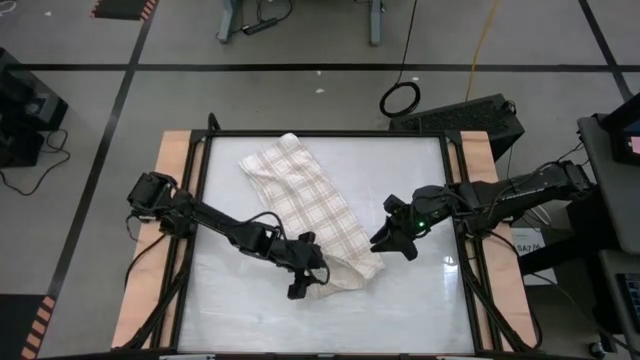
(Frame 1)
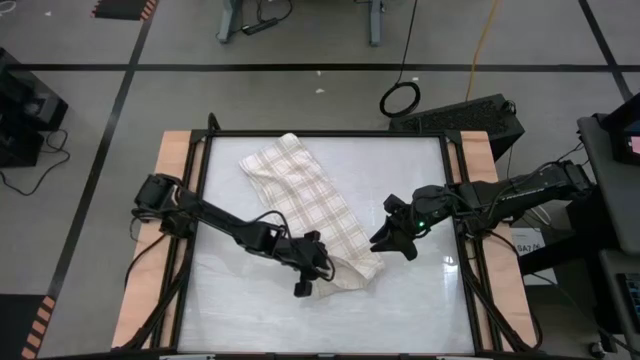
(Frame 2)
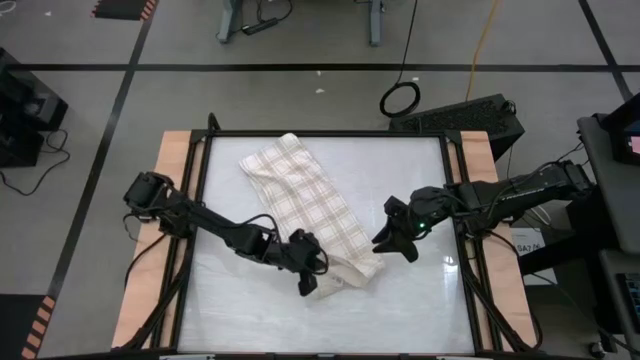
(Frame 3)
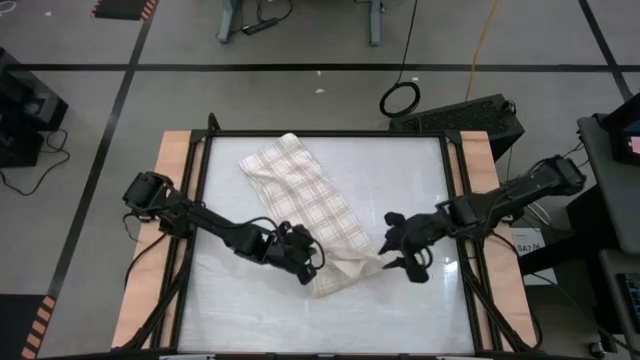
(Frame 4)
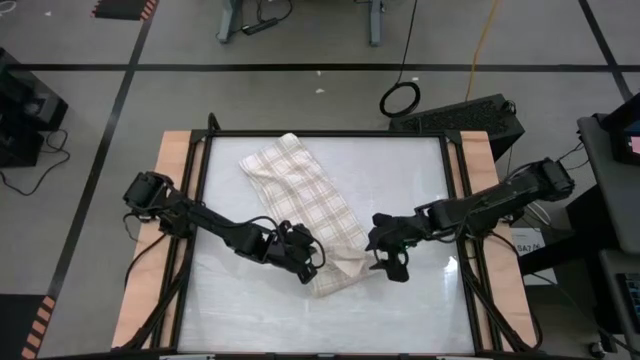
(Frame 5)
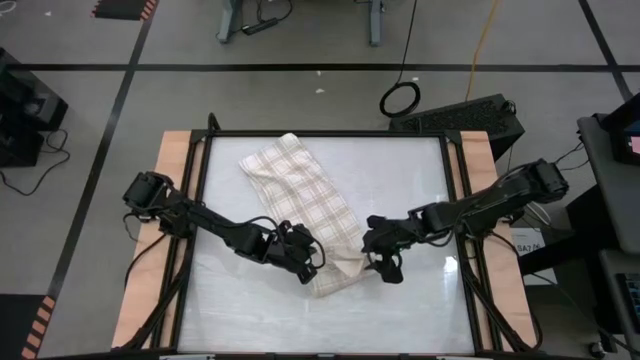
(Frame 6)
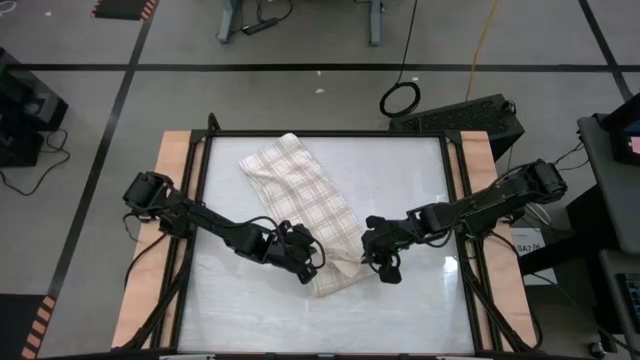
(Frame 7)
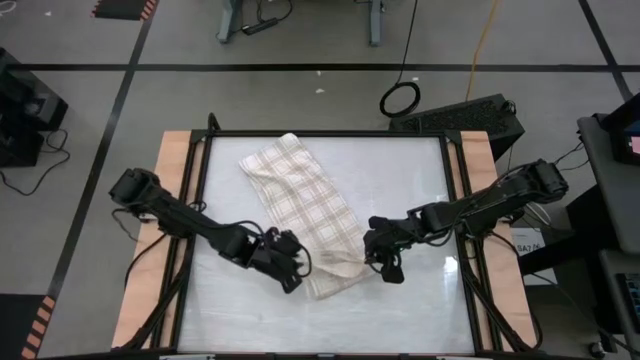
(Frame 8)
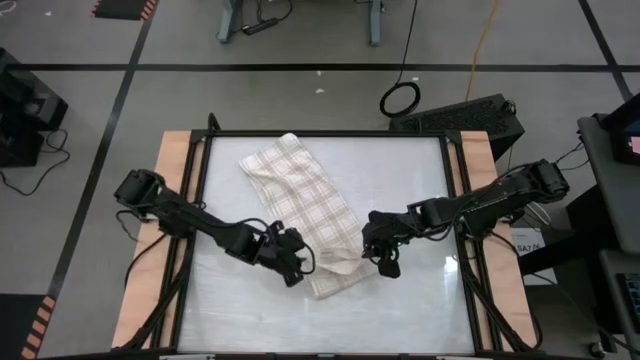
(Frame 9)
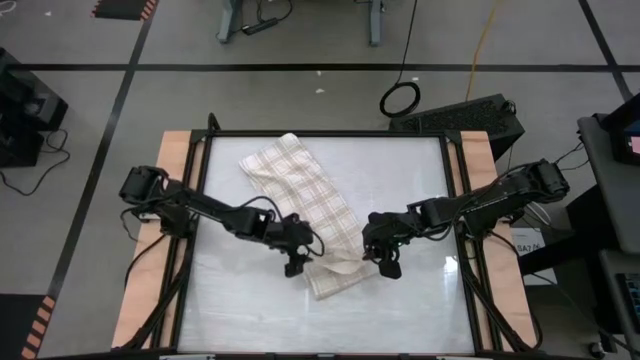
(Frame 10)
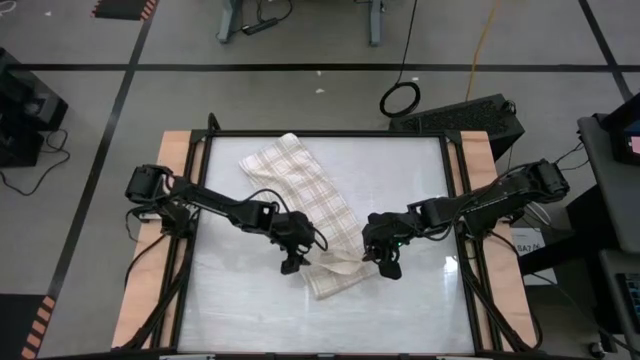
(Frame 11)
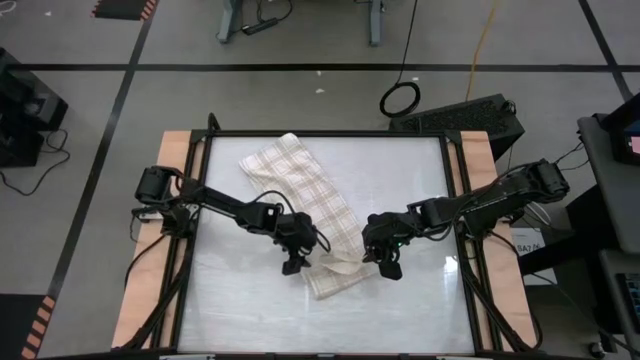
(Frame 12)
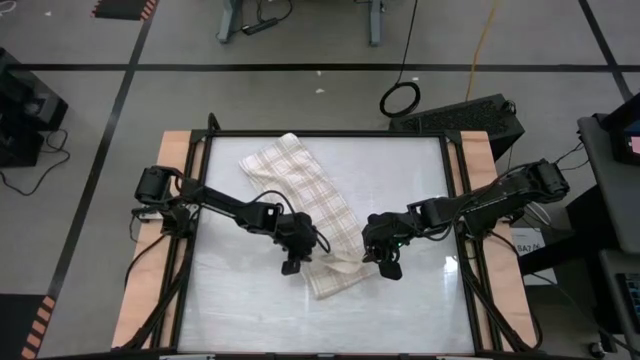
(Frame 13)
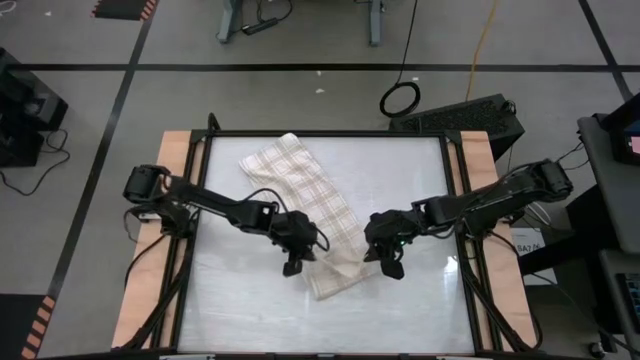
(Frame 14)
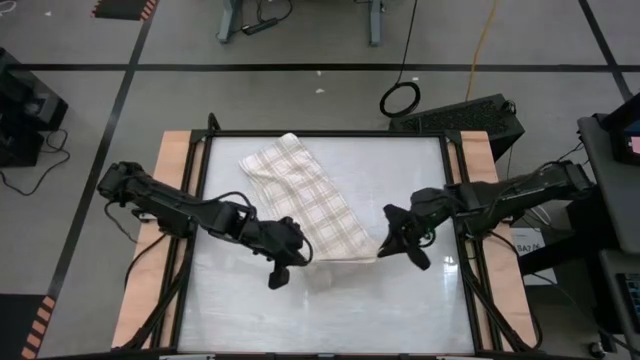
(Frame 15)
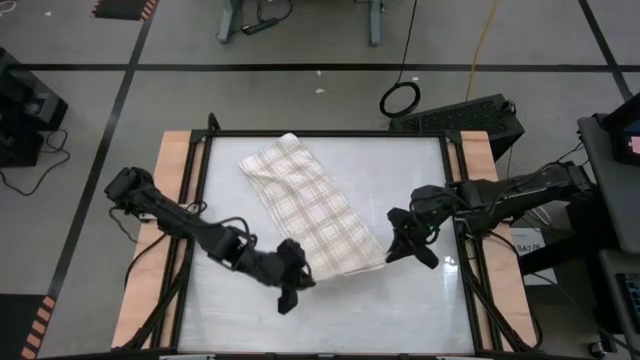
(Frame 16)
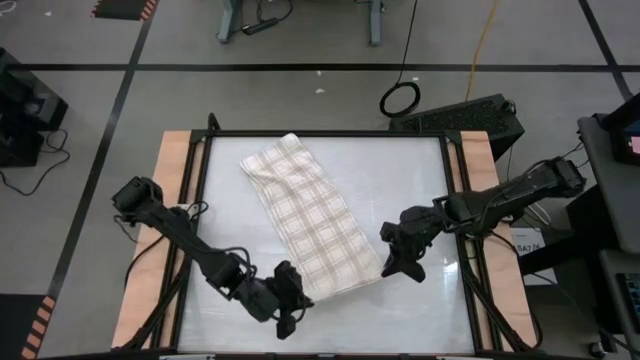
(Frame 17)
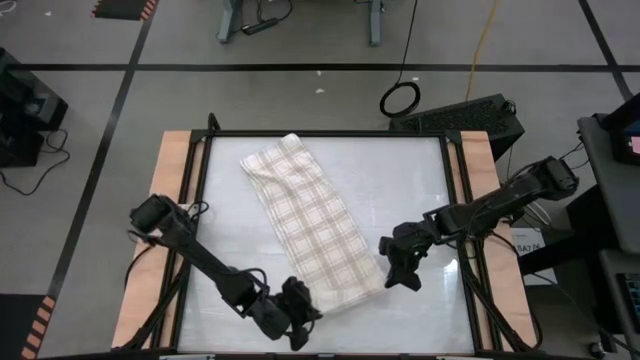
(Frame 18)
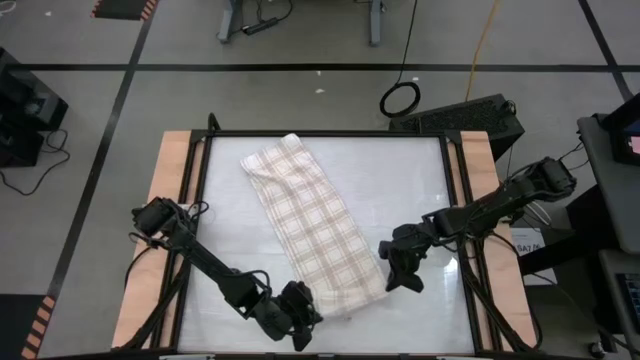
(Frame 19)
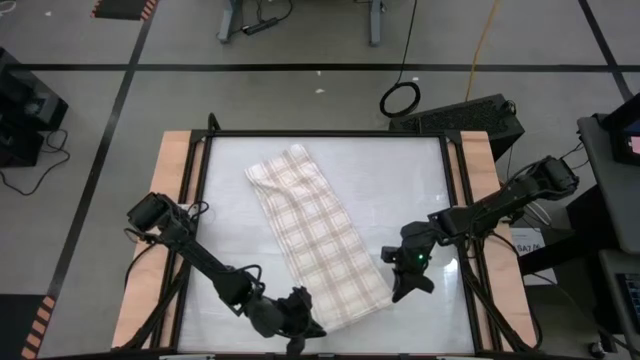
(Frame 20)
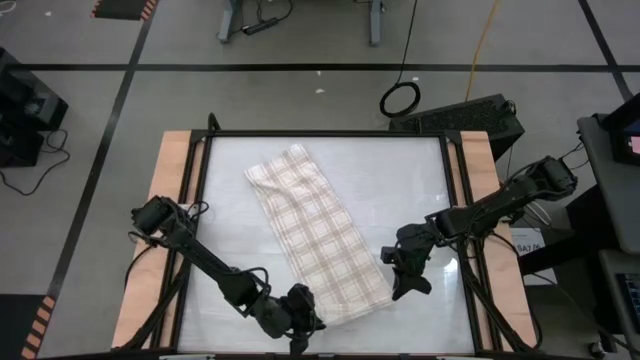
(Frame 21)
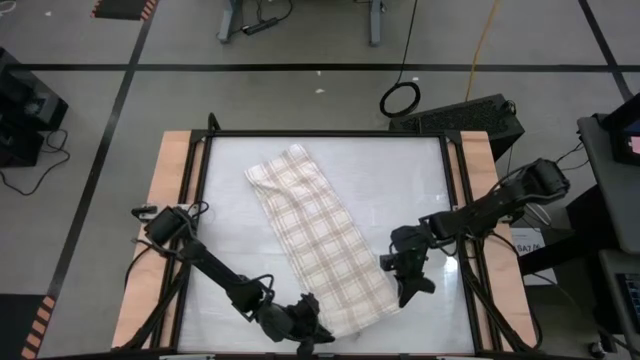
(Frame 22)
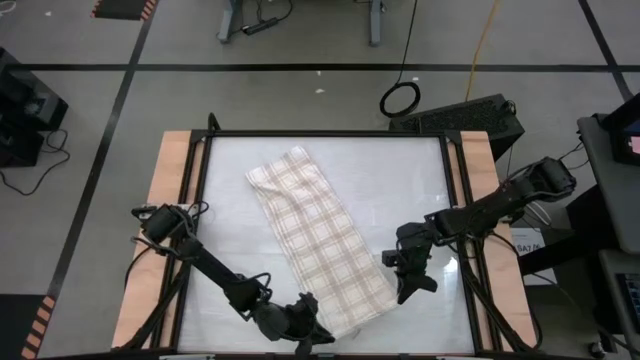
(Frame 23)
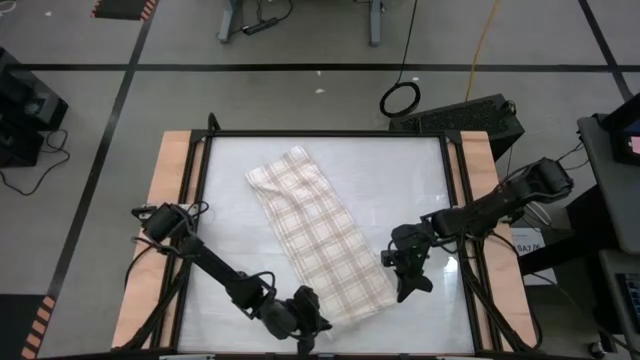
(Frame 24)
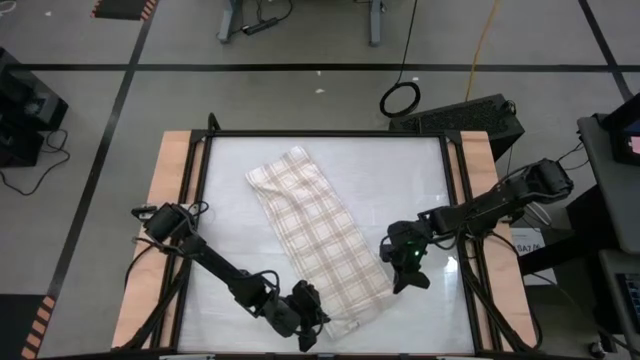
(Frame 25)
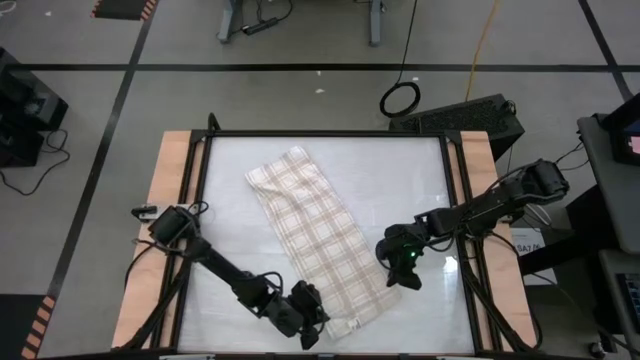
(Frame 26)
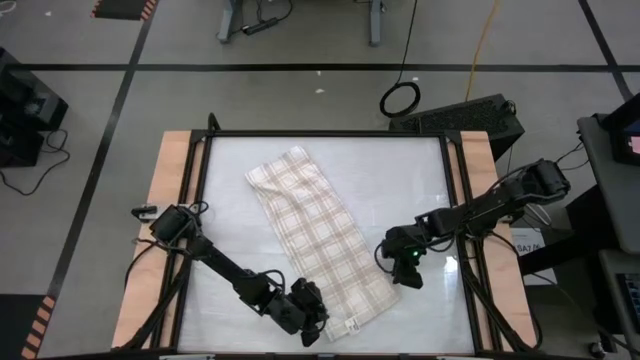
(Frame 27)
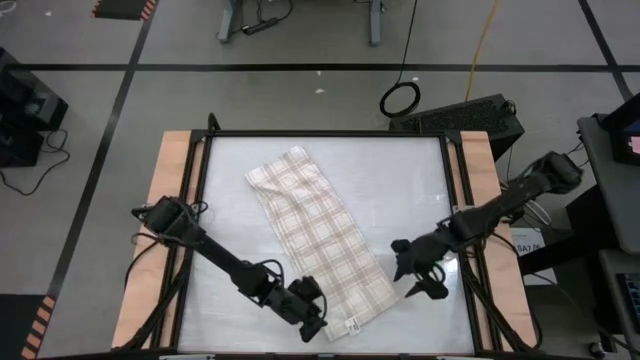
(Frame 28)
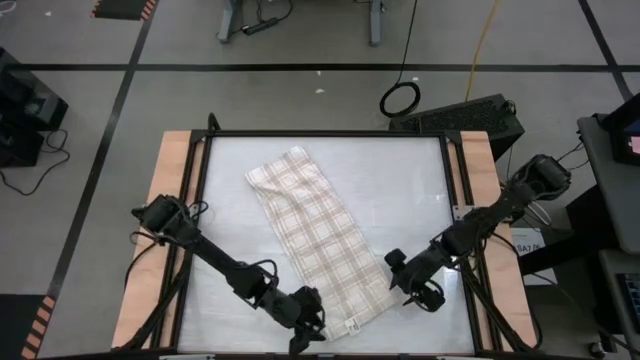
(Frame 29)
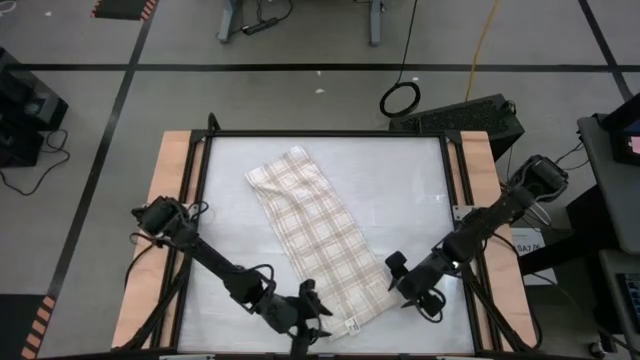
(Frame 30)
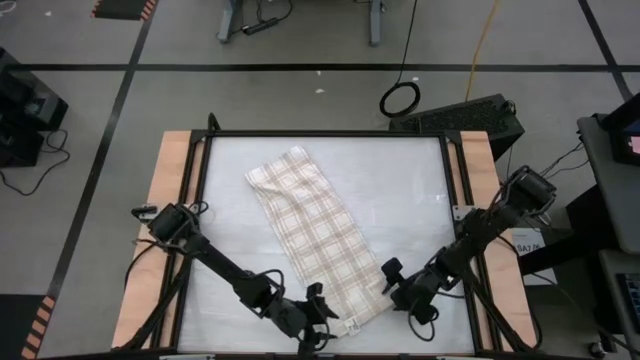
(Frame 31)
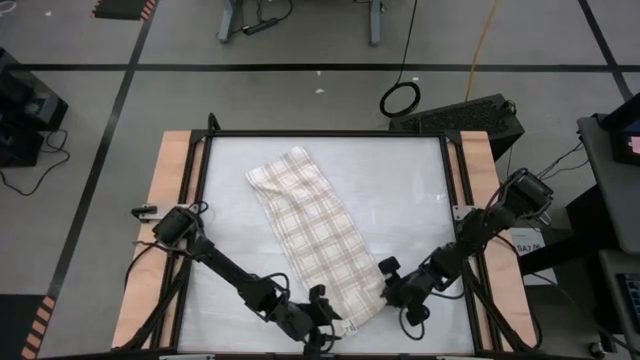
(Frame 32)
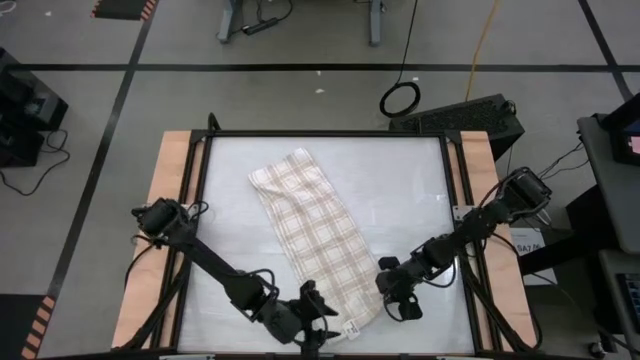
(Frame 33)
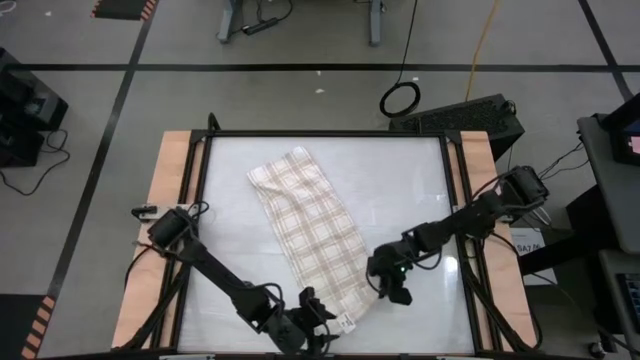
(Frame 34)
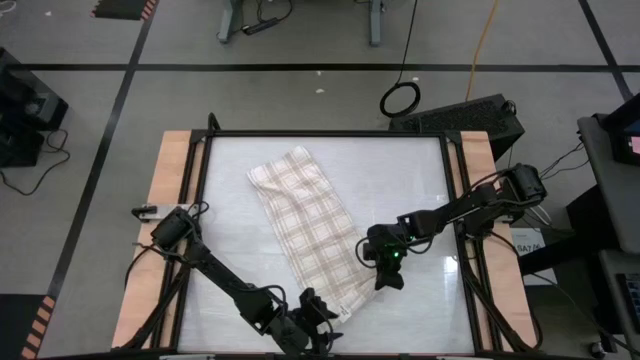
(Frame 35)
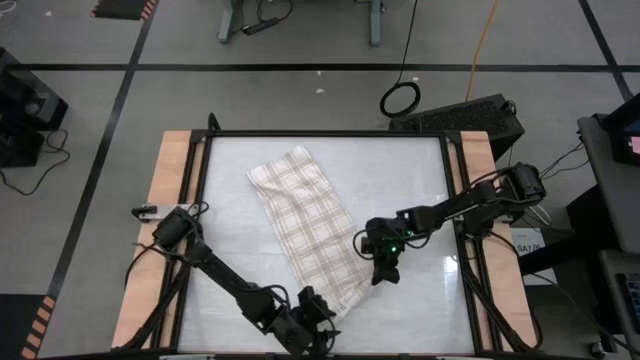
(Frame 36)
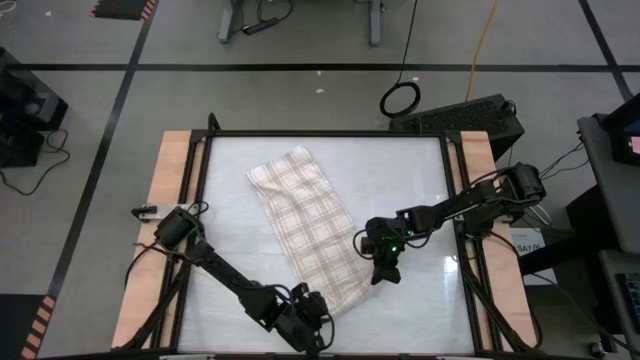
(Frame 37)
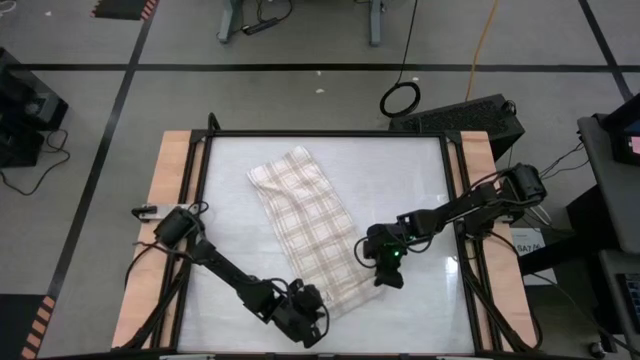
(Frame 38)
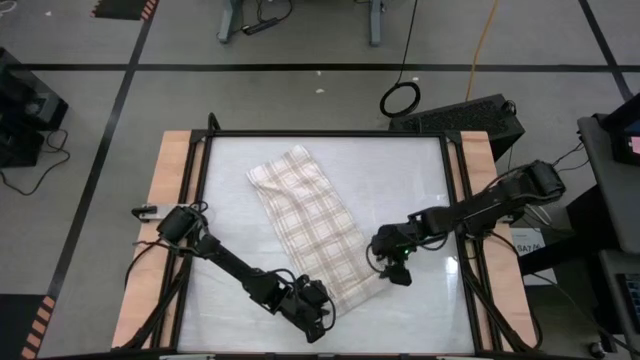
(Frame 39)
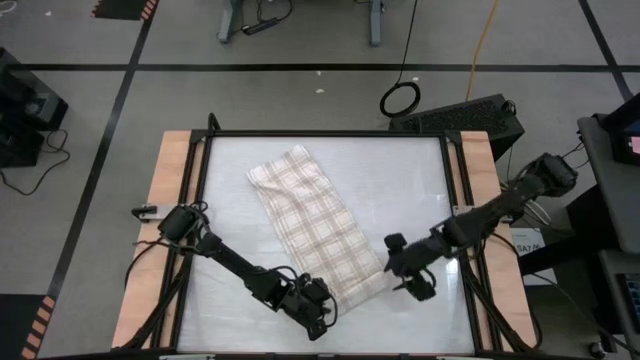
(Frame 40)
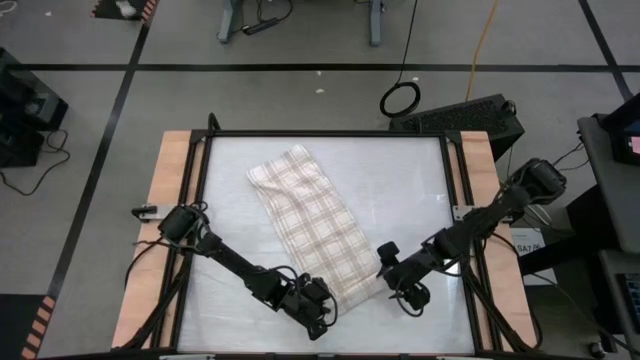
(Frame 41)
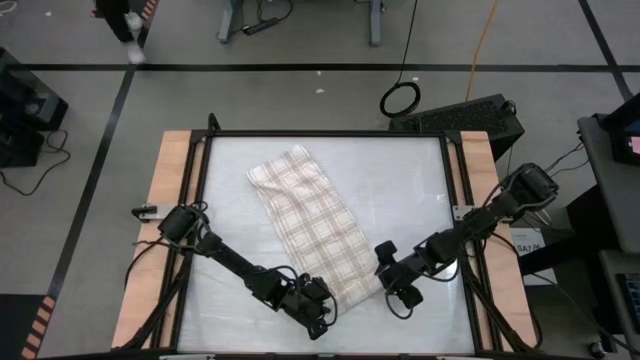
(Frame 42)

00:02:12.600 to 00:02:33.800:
Task: Roll towel
Roll the white-brown patterned towel

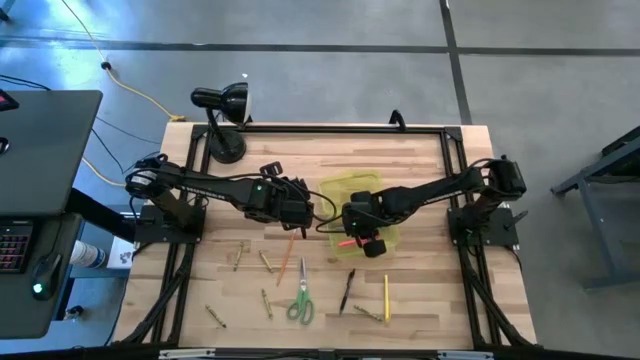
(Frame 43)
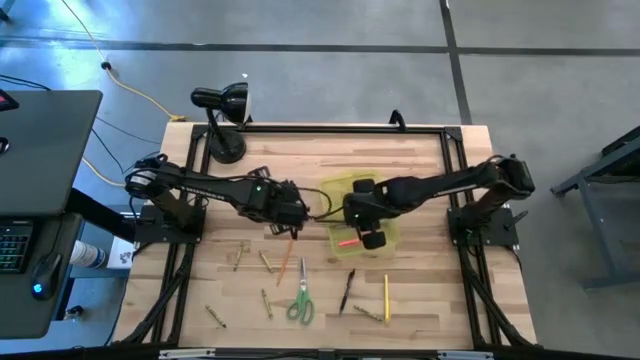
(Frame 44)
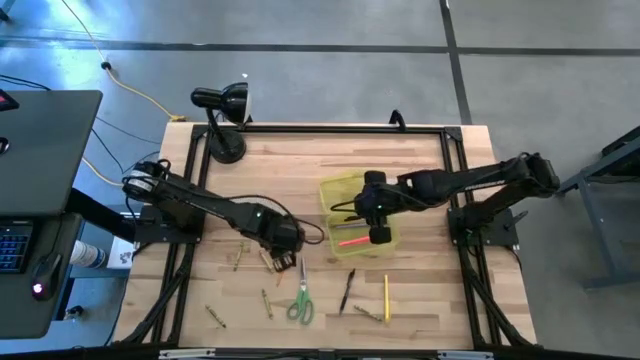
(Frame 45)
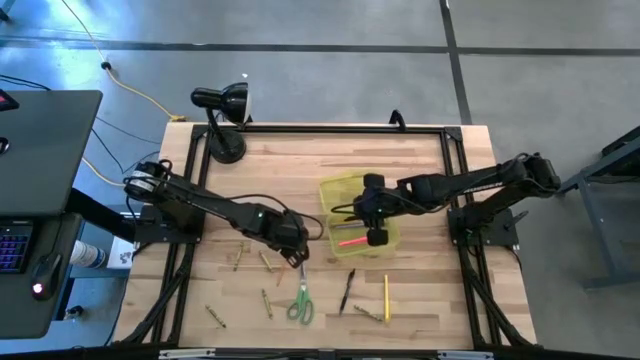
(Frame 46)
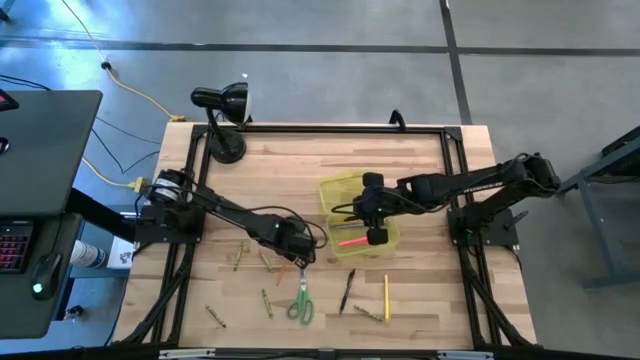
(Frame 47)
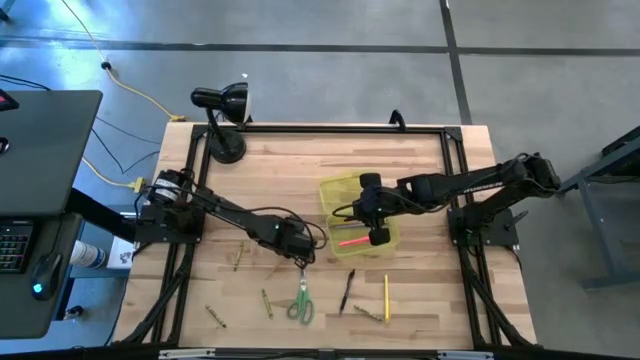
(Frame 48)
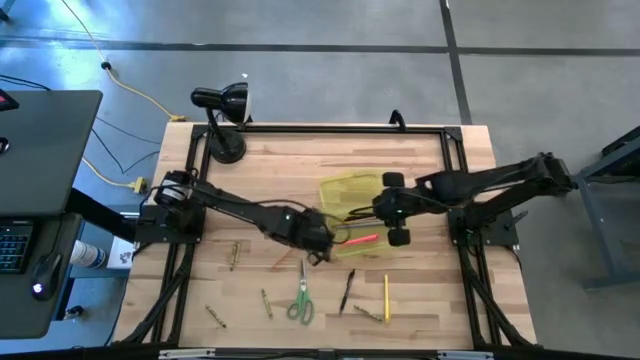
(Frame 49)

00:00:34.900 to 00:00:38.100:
Task: Pick & place school supplies into a supply box
Put the orange pencil into the yellow supply box
